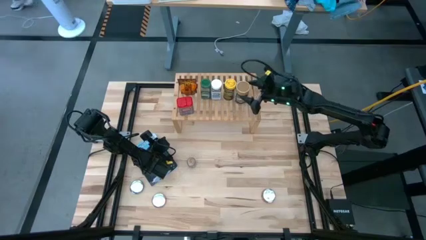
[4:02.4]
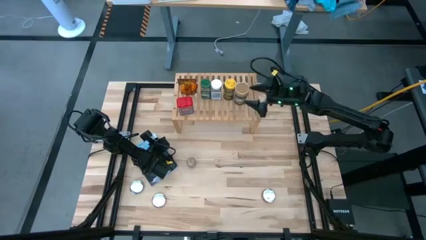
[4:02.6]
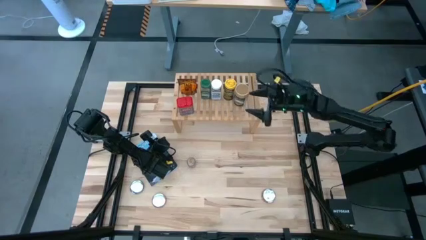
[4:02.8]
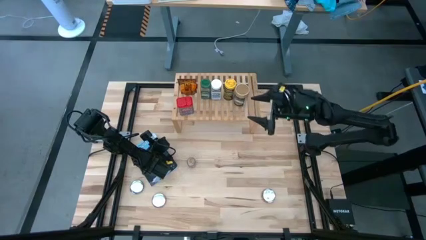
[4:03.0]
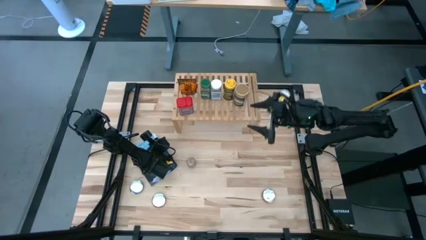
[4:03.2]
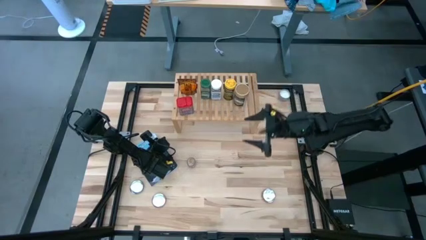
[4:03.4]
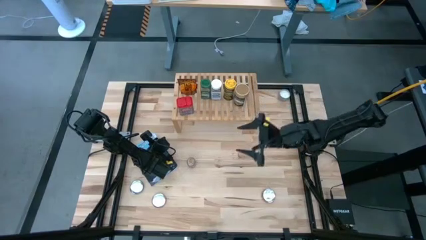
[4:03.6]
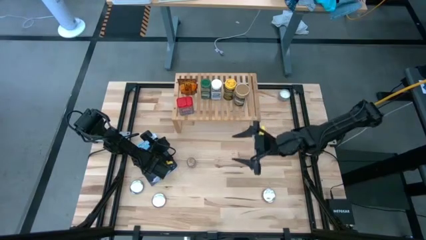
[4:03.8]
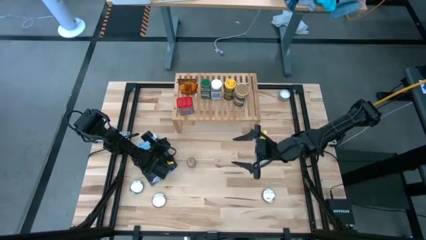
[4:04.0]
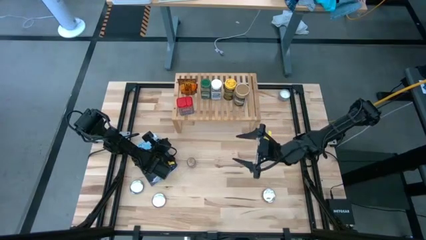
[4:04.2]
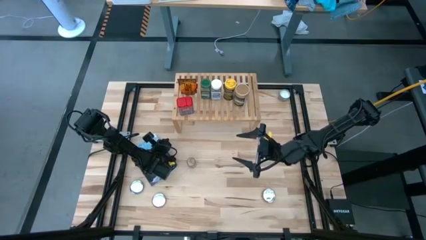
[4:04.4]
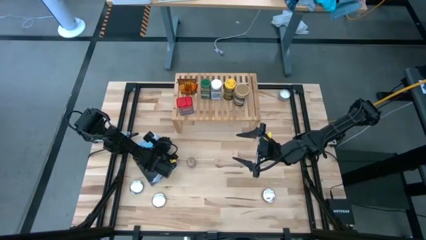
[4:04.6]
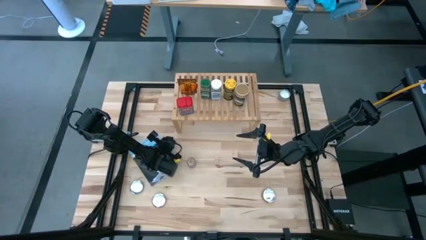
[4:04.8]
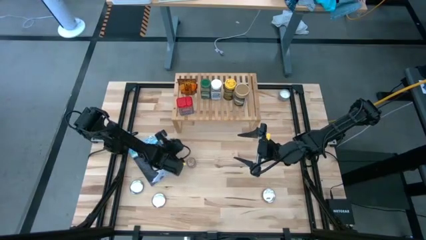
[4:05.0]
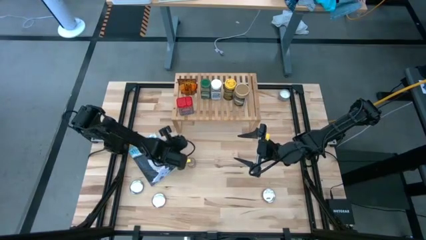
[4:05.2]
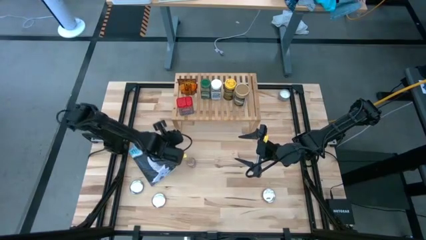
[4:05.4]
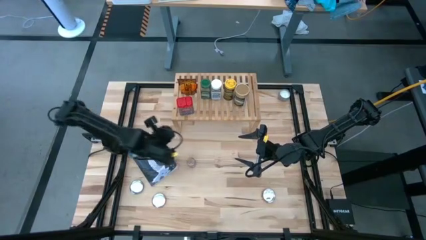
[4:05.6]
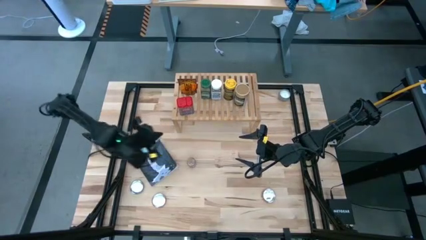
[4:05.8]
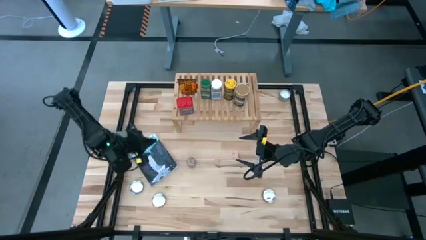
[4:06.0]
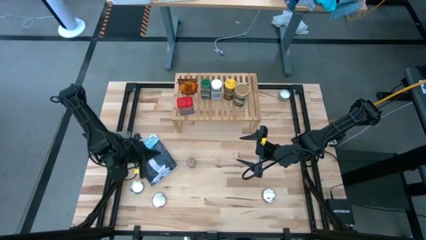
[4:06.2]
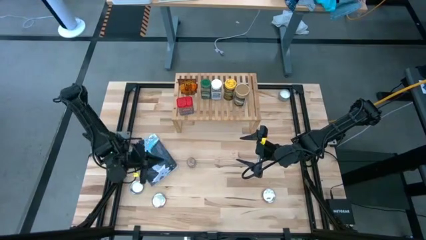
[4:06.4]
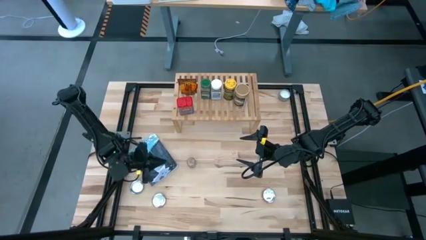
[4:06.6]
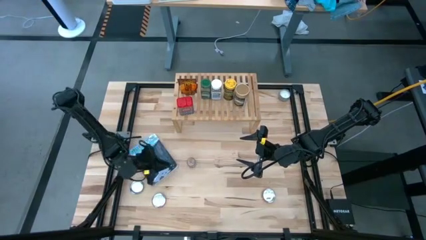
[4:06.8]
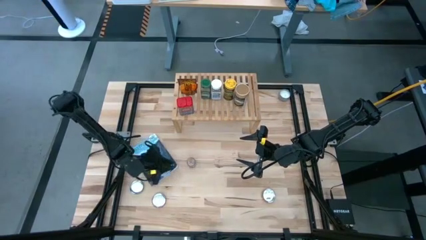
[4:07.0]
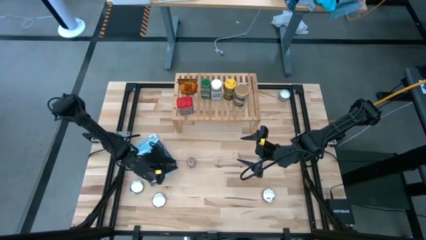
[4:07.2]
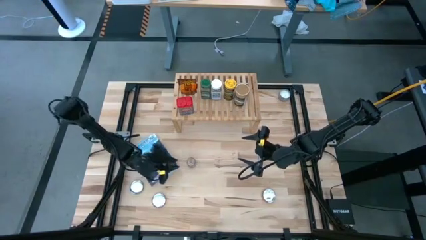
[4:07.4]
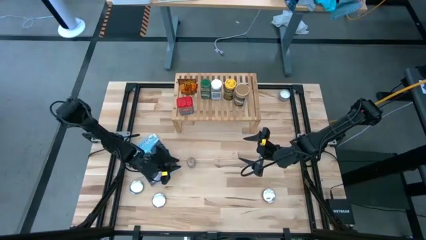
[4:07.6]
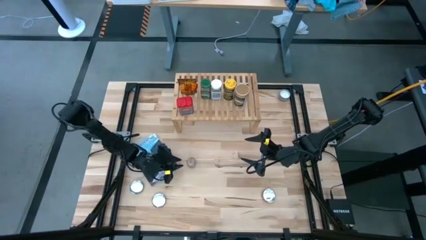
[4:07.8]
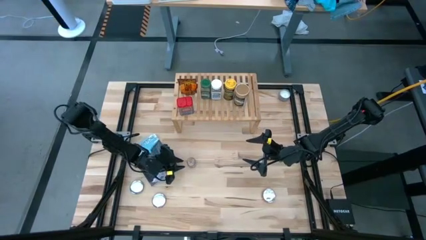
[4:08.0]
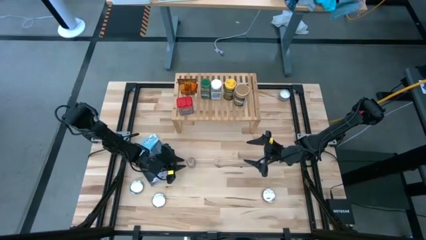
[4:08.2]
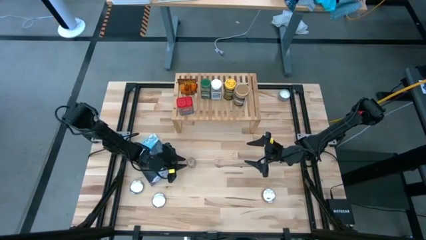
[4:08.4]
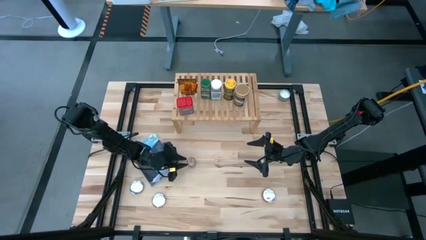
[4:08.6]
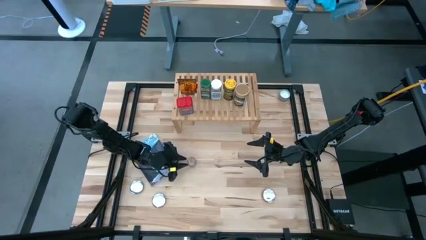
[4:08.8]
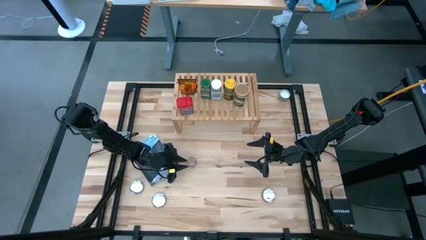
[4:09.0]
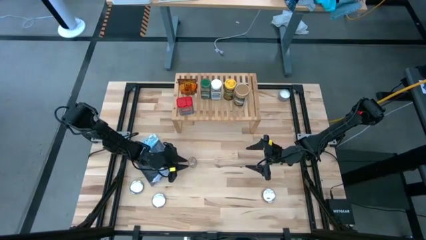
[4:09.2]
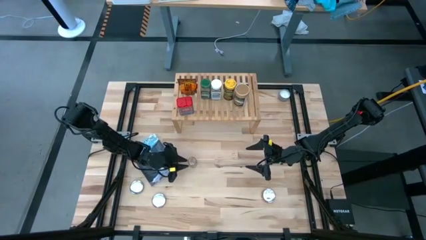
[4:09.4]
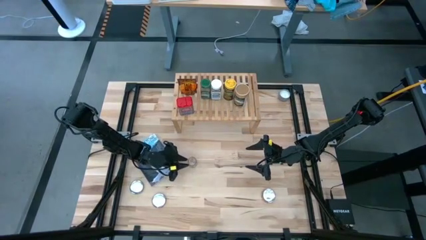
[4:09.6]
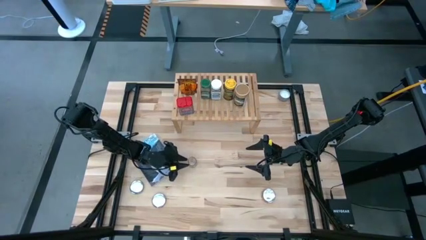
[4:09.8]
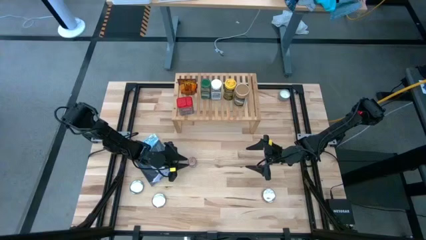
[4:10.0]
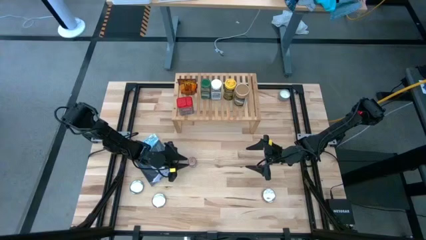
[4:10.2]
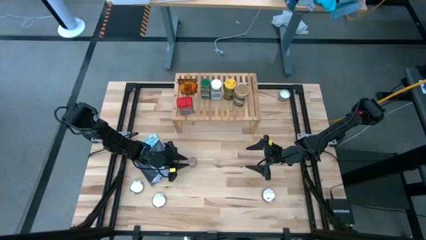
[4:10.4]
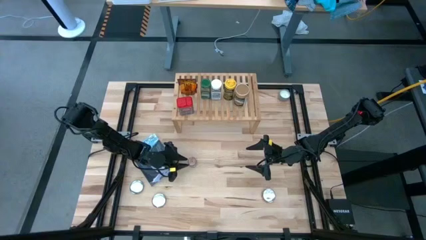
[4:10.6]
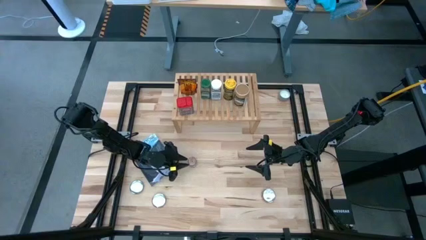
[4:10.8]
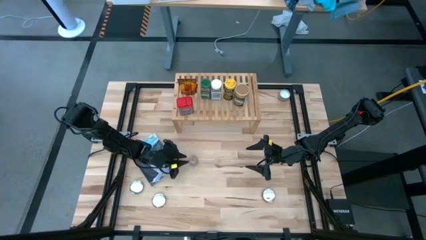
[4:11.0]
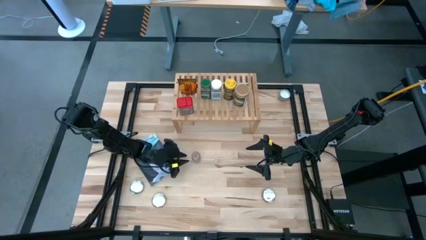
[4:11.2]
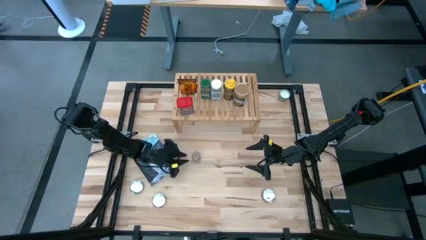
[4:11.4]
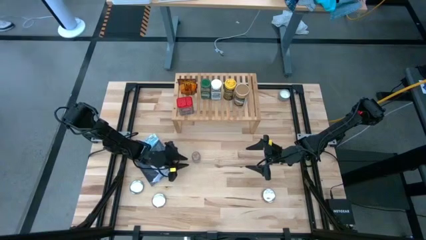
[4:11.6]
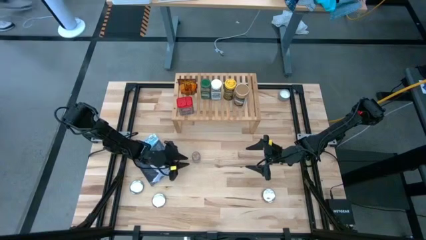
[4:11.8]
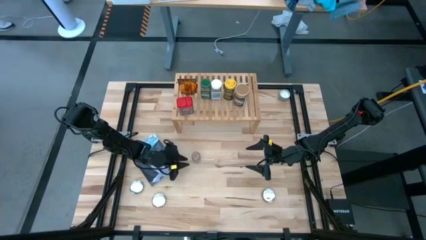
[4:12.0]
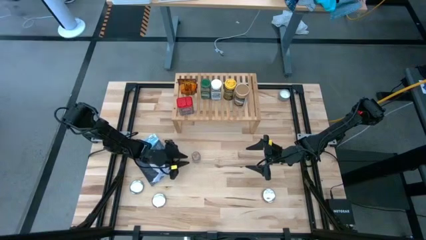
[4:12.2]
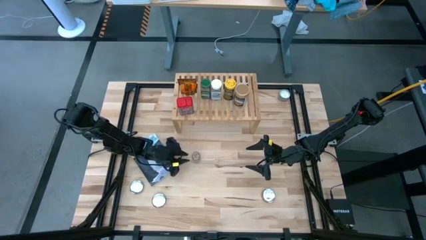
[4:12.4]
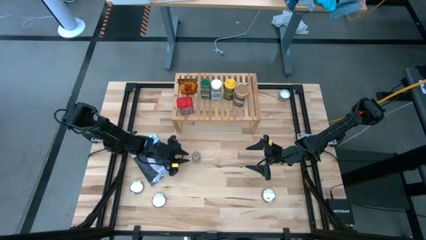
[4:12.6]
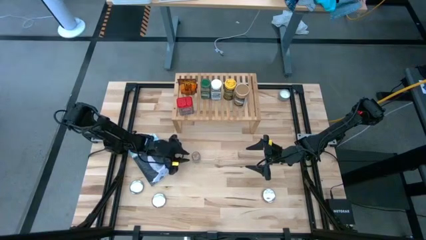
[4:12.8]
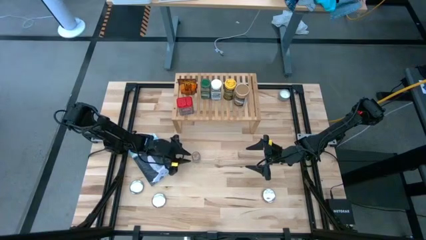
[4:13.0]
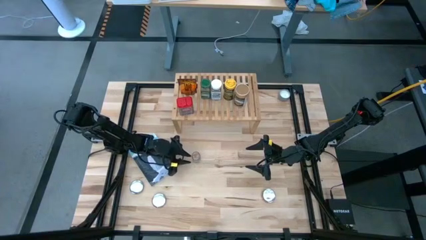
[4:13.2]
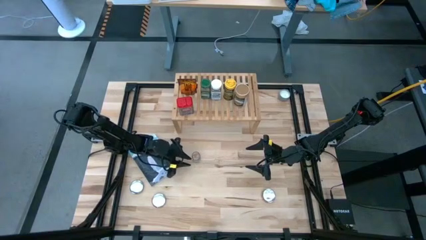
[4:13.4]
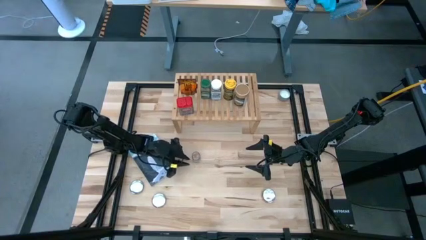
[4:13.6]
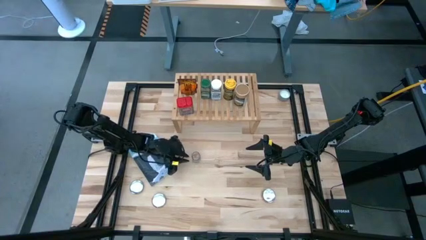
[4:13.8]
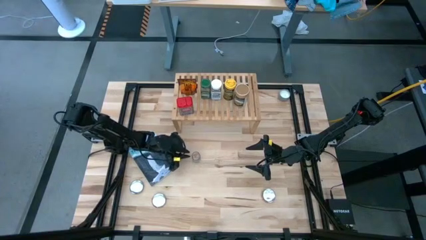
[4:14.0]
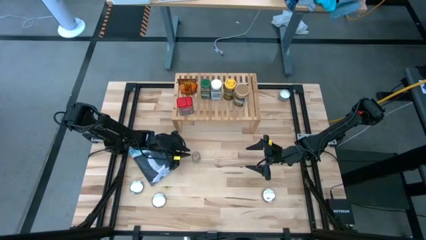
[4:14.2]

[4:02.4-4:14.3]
Task: Shelf spices
Put the transparent seasoning bottle on the shelf

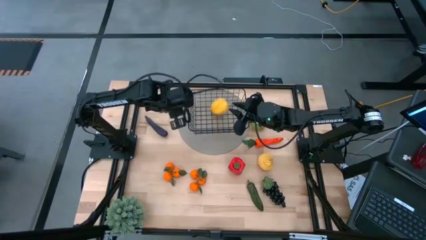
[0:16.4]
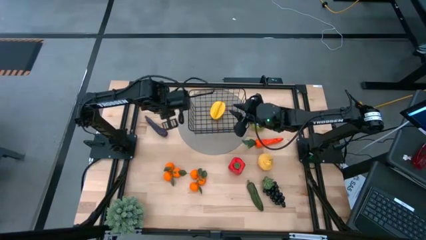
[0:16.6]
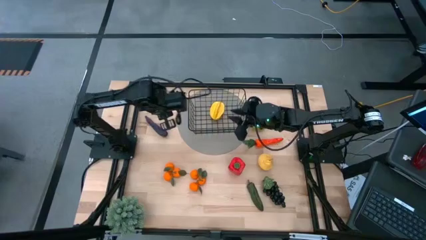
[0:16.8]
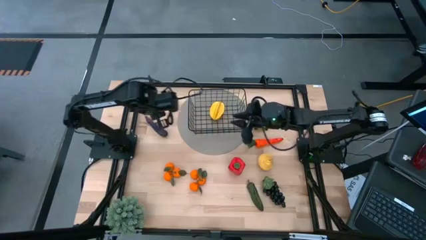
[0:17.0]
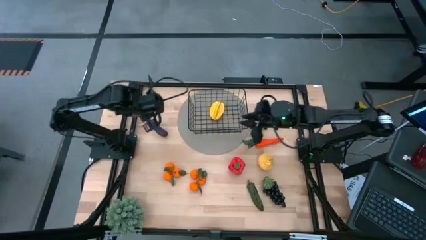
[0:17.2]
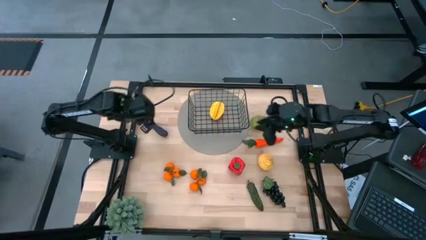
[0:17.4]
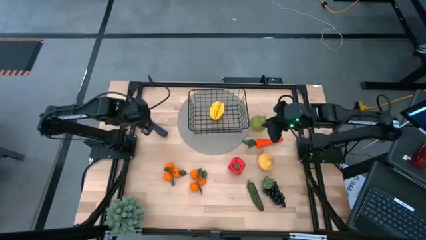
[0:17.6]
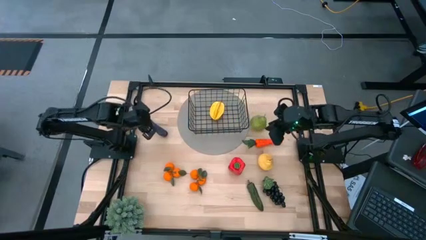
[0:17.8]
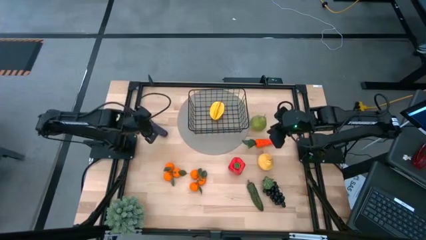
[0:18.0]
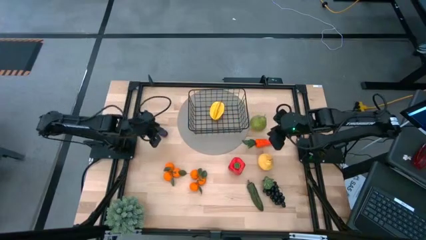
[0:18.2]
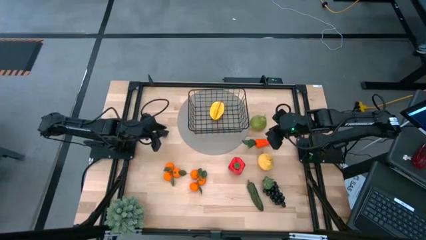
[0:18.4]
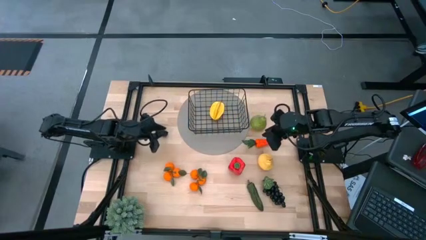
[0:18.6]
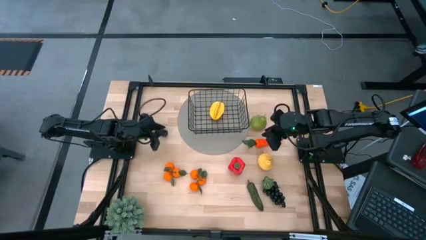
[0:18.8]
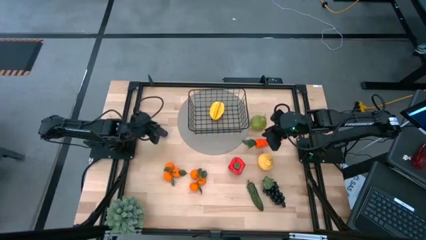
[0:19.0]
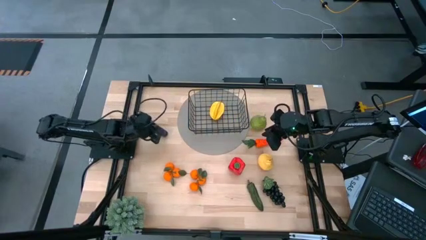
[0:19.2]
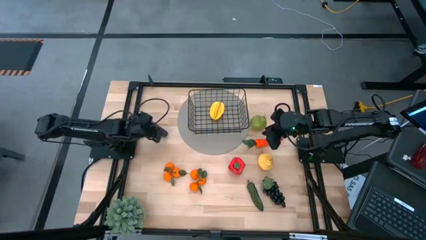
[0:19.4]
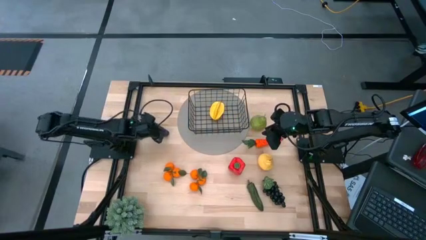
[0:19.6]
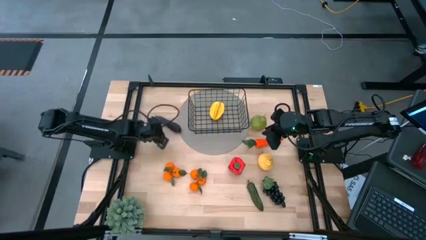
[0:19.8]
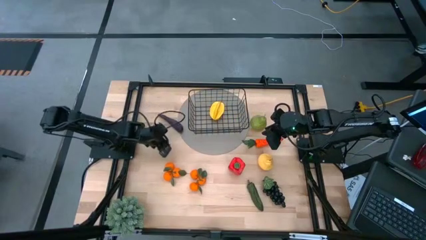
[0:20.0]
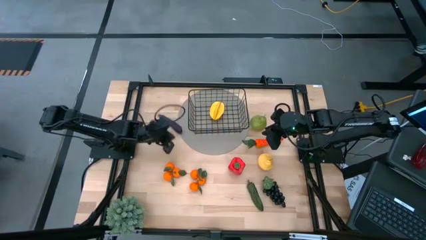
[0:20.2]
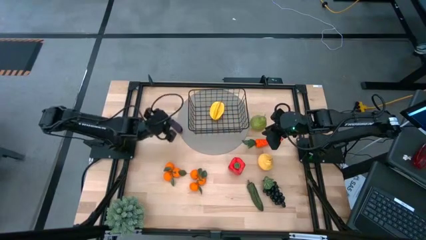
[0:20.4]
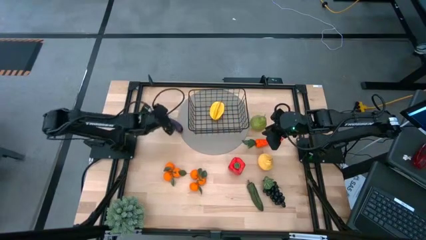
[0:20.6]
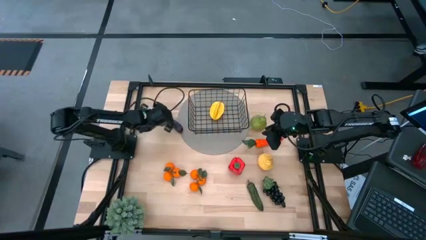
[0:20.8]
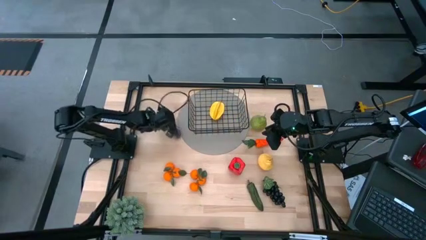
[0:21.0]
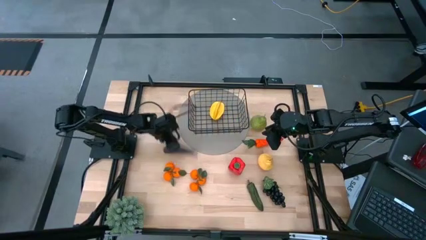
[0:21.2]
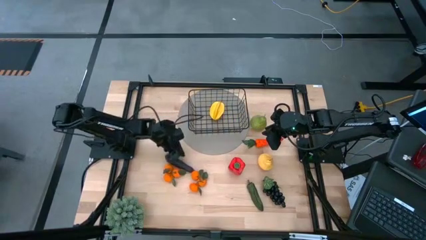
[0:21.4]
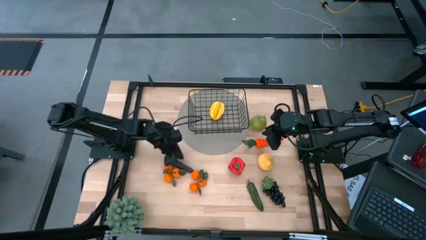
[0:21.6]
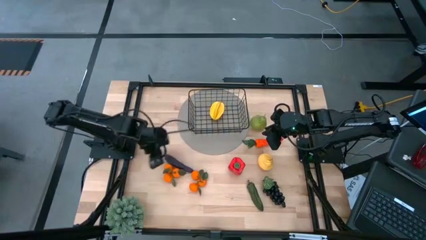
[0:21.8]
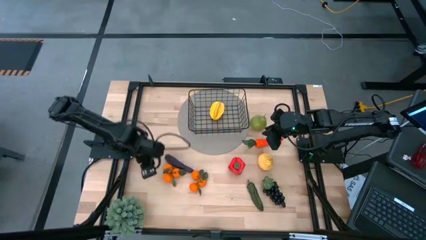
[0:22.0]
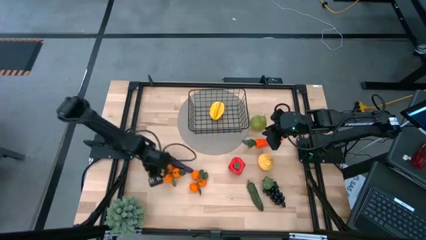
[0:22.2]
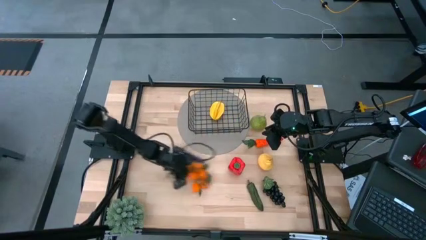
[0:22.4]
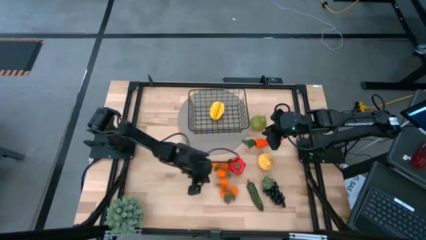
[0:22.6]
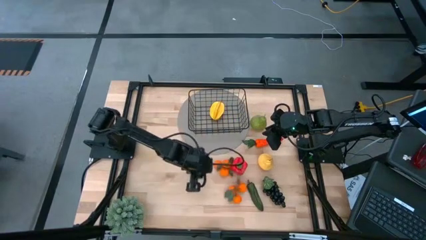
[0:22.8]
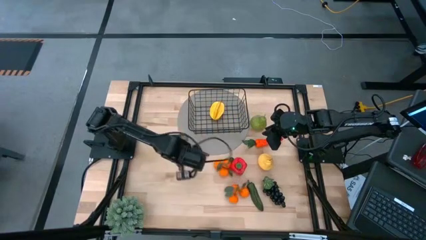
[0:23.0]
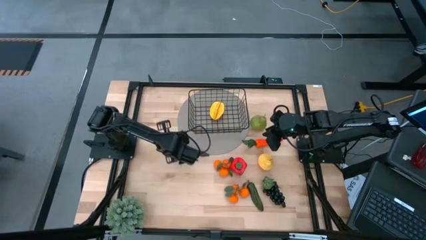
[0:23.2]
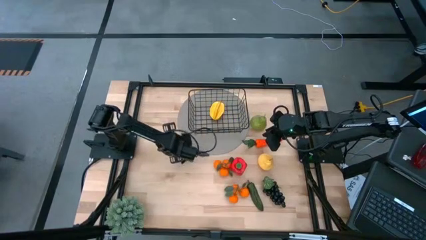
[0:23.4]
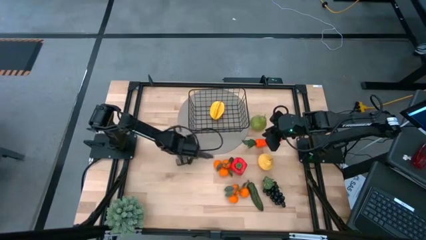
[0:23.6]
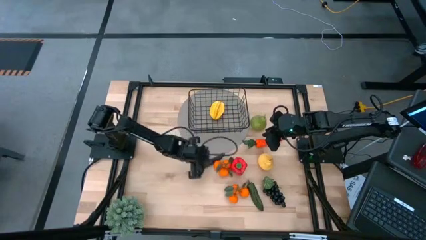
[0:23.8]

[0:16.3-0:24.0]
Task: Build produce basket
Move the eggplant and tangerines to the bottom middle of the table
